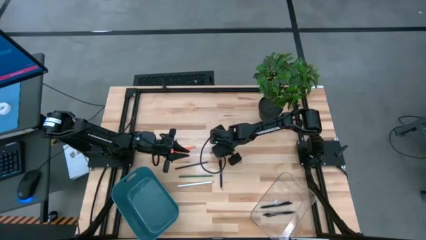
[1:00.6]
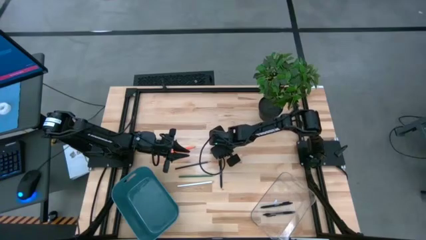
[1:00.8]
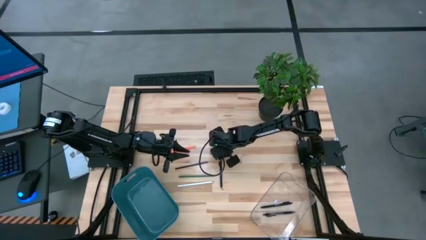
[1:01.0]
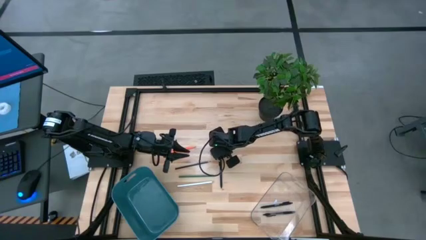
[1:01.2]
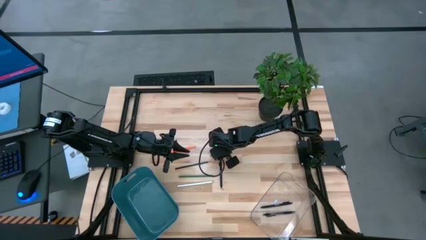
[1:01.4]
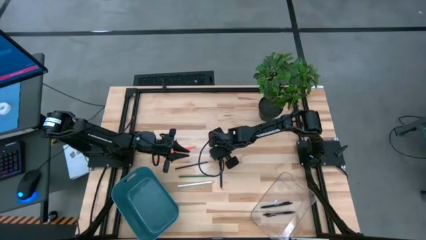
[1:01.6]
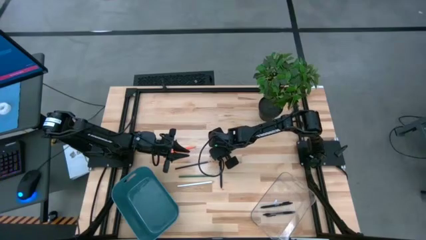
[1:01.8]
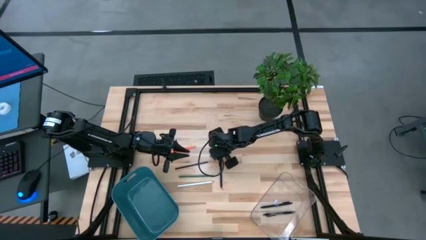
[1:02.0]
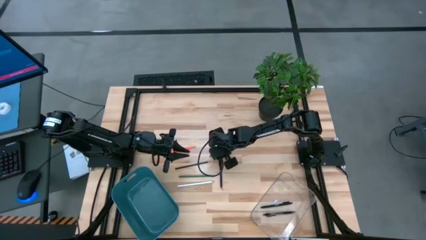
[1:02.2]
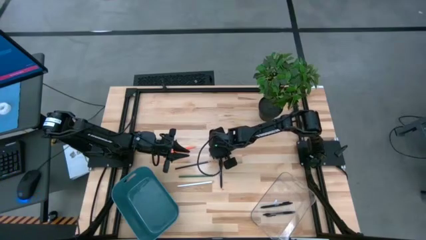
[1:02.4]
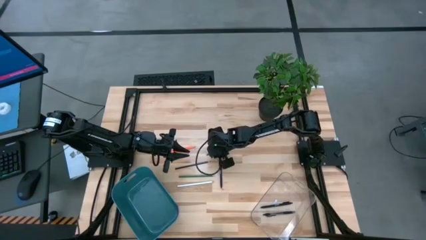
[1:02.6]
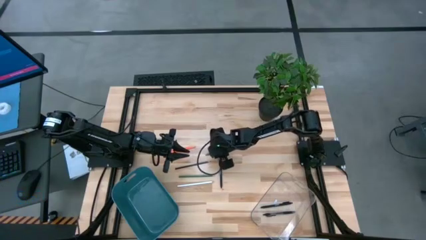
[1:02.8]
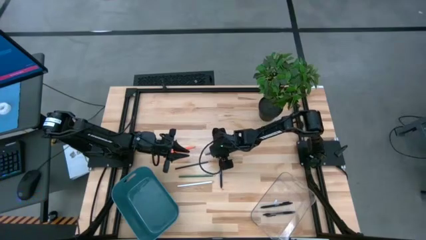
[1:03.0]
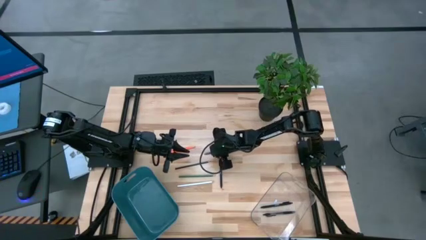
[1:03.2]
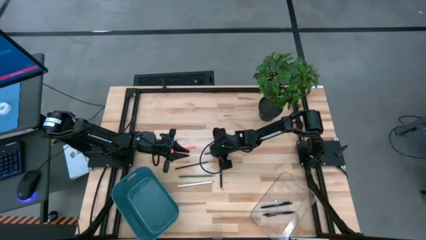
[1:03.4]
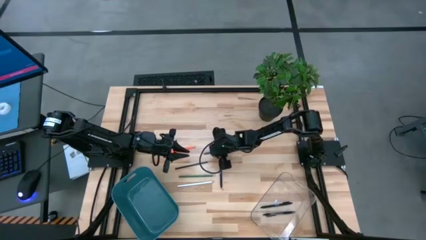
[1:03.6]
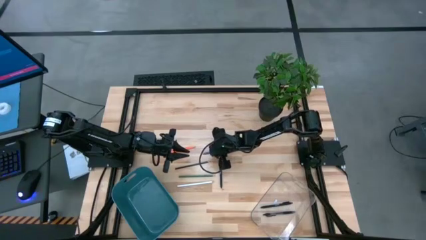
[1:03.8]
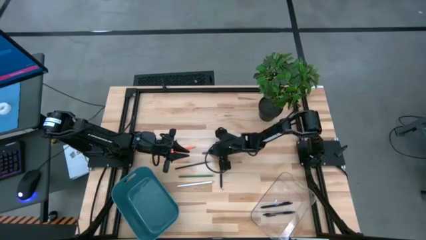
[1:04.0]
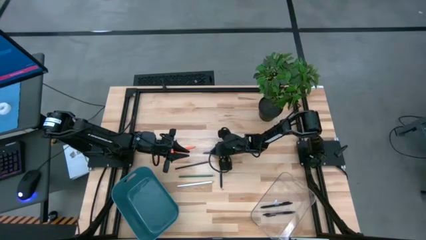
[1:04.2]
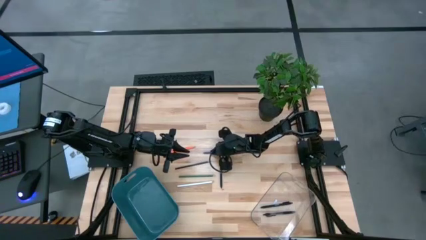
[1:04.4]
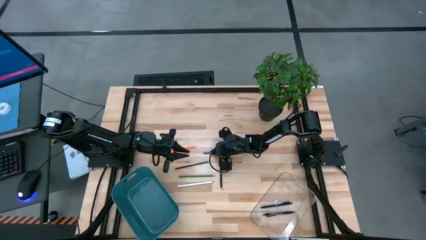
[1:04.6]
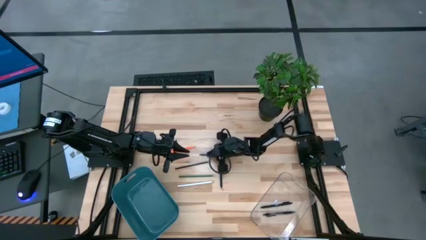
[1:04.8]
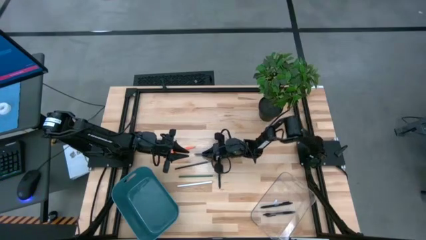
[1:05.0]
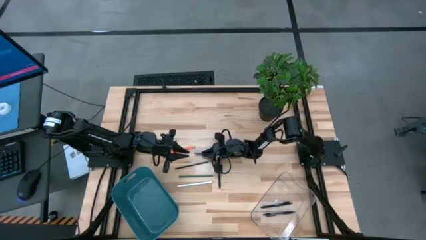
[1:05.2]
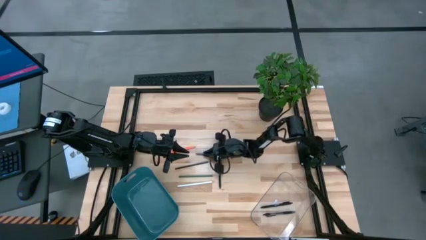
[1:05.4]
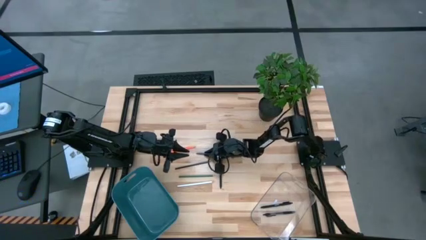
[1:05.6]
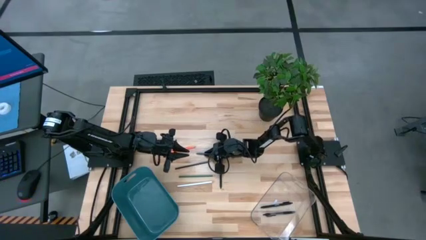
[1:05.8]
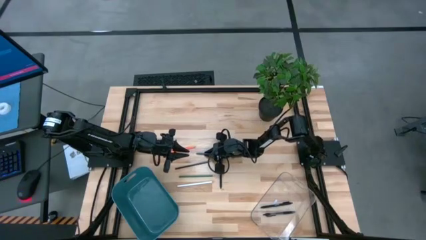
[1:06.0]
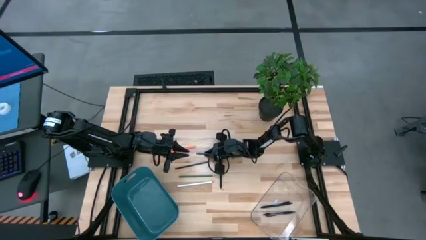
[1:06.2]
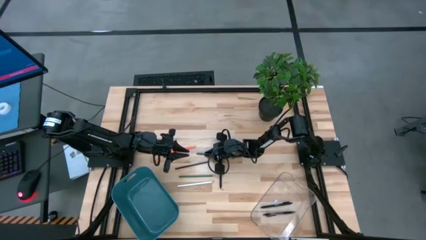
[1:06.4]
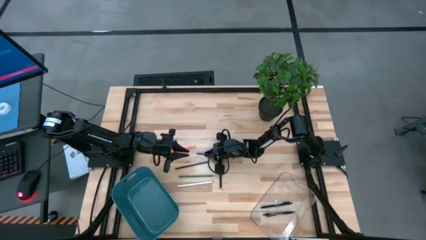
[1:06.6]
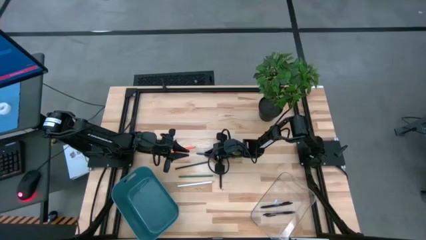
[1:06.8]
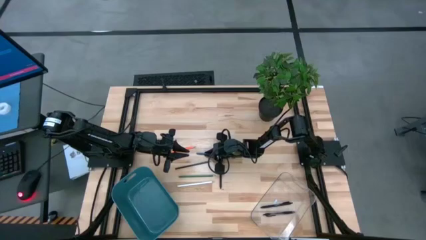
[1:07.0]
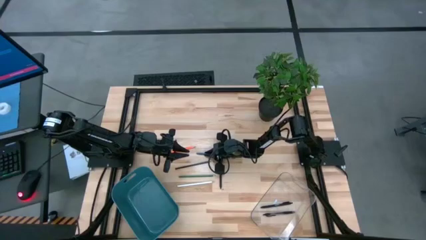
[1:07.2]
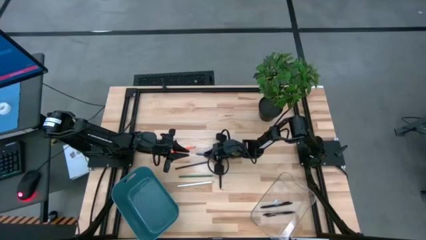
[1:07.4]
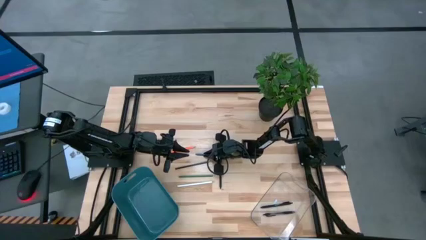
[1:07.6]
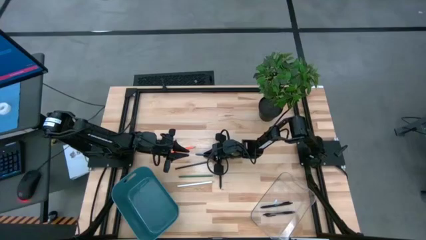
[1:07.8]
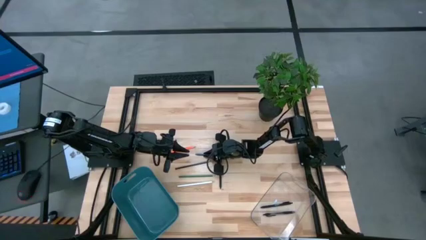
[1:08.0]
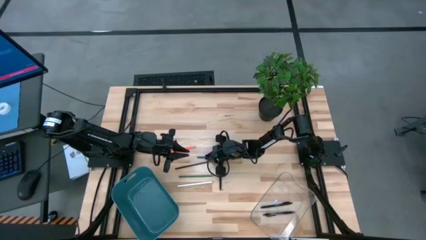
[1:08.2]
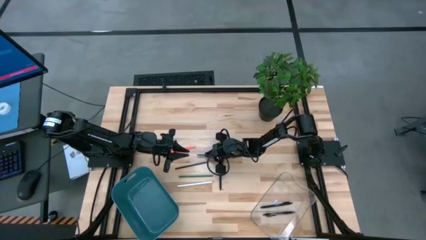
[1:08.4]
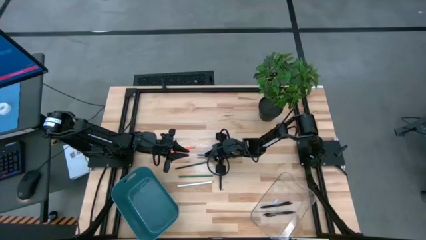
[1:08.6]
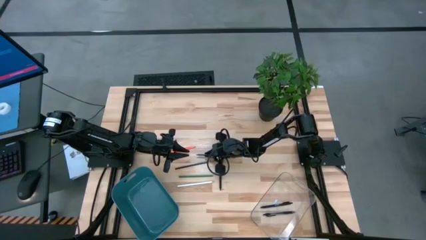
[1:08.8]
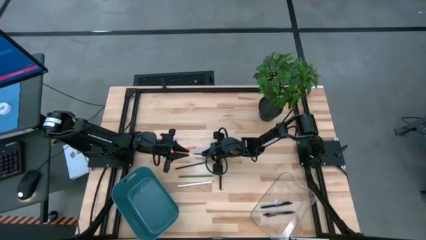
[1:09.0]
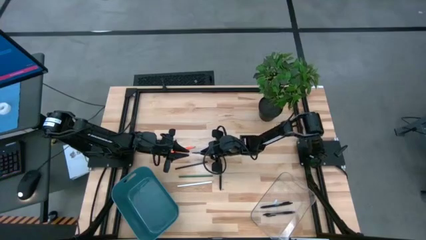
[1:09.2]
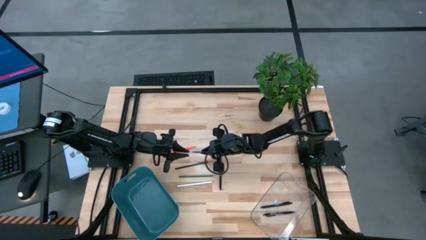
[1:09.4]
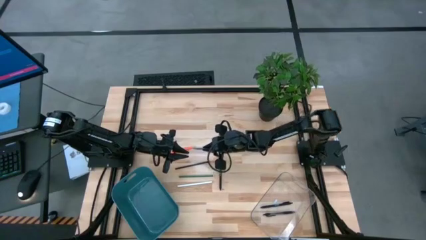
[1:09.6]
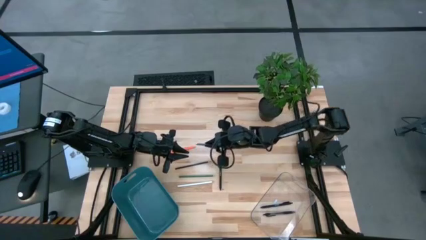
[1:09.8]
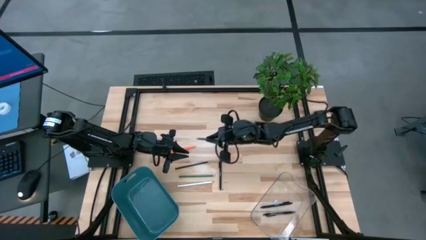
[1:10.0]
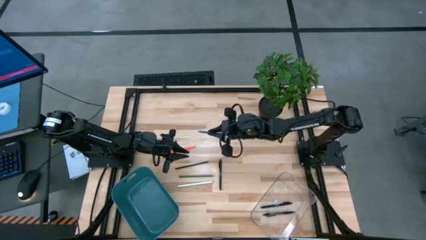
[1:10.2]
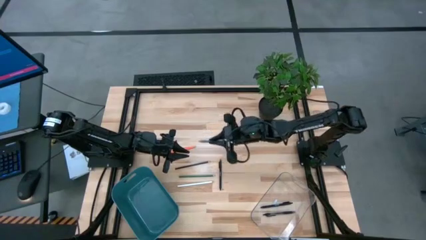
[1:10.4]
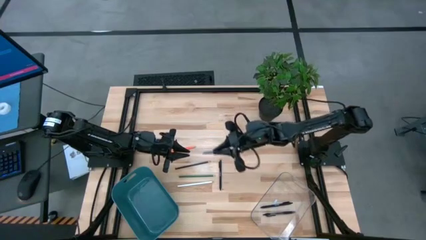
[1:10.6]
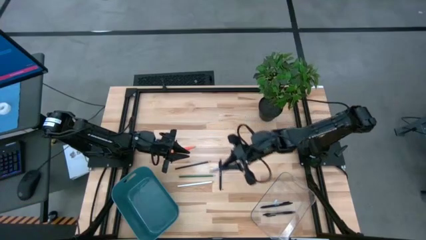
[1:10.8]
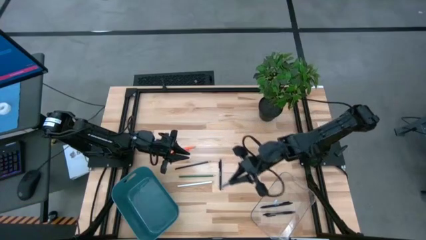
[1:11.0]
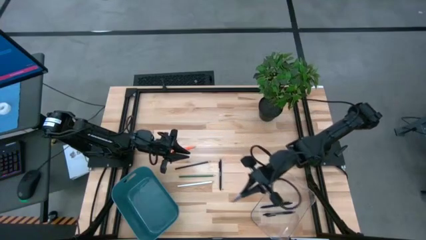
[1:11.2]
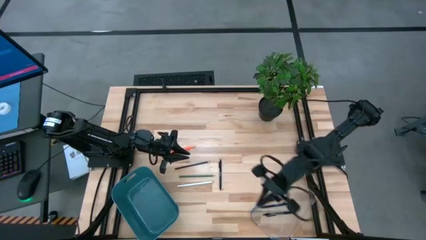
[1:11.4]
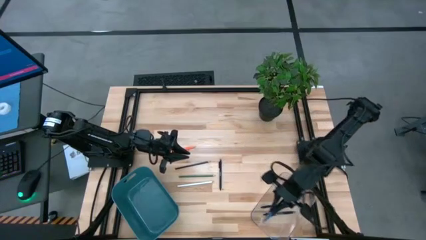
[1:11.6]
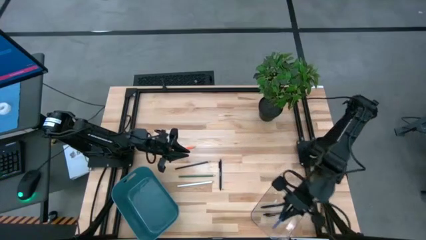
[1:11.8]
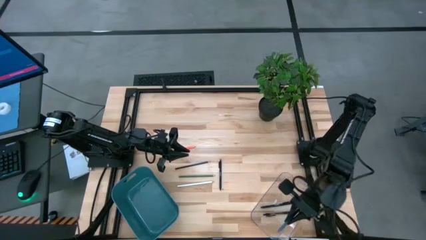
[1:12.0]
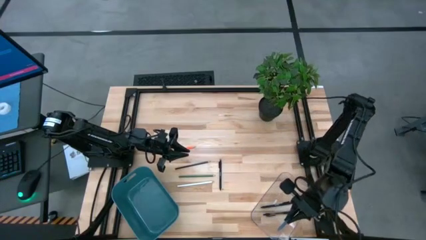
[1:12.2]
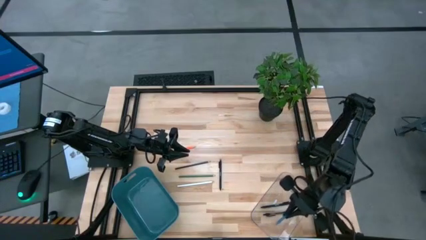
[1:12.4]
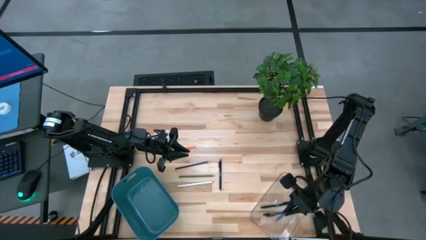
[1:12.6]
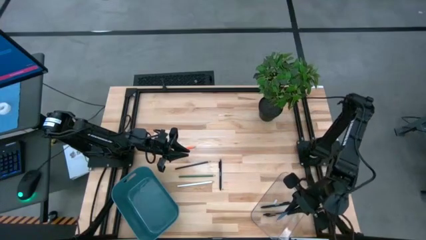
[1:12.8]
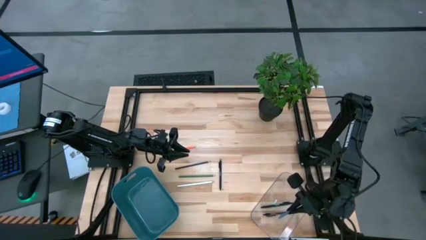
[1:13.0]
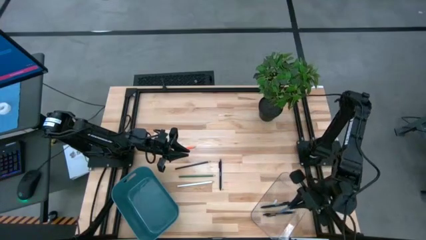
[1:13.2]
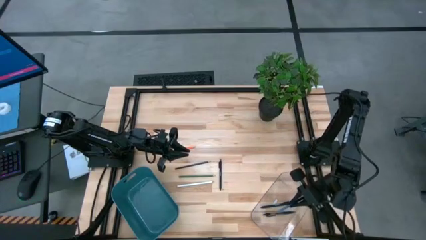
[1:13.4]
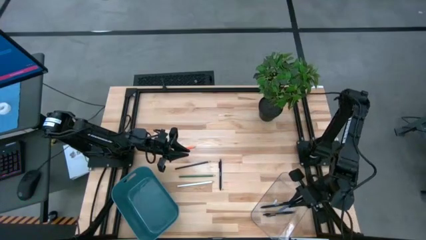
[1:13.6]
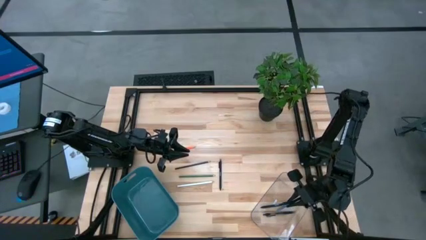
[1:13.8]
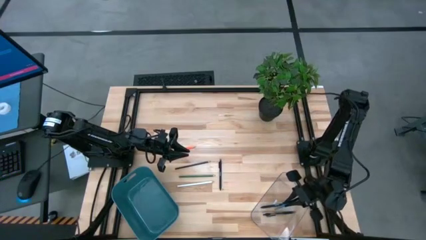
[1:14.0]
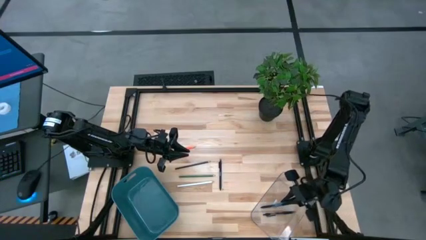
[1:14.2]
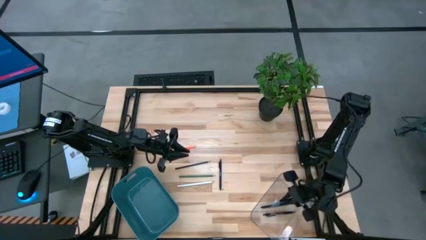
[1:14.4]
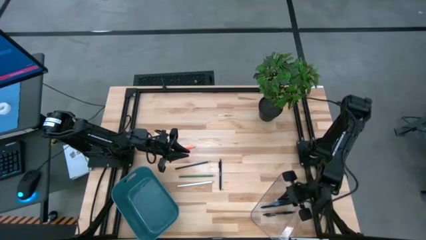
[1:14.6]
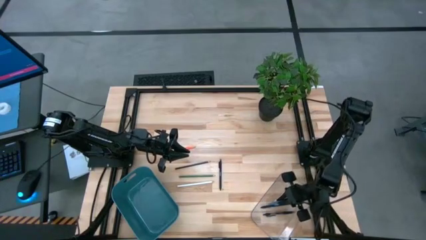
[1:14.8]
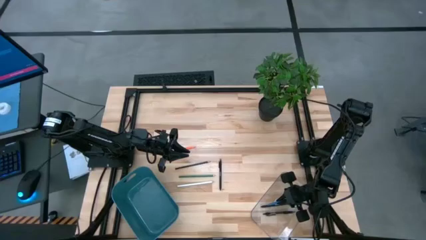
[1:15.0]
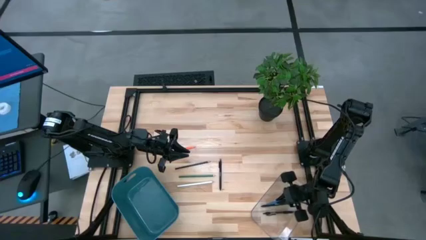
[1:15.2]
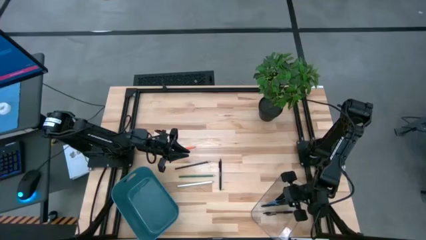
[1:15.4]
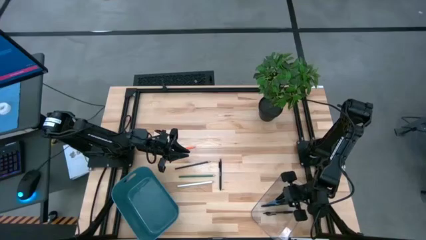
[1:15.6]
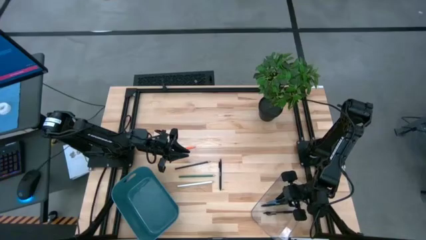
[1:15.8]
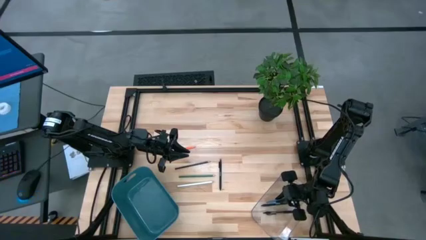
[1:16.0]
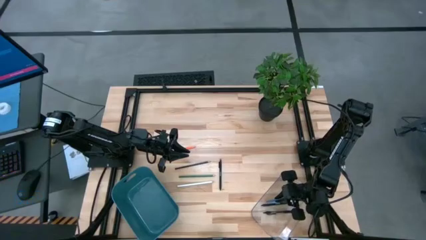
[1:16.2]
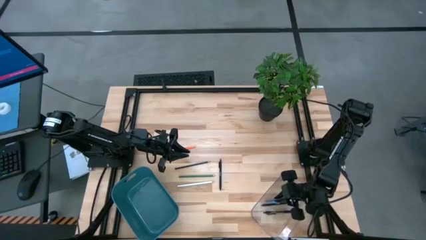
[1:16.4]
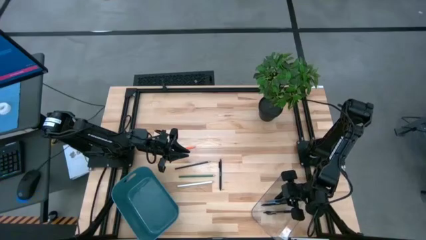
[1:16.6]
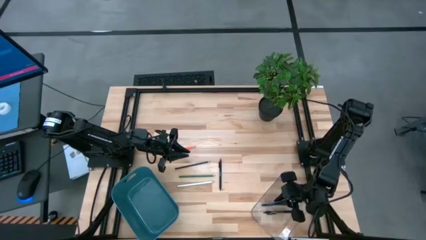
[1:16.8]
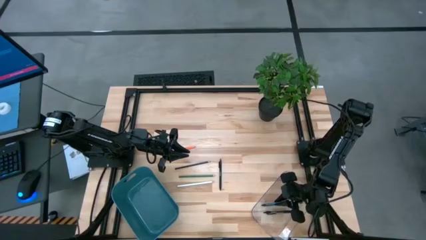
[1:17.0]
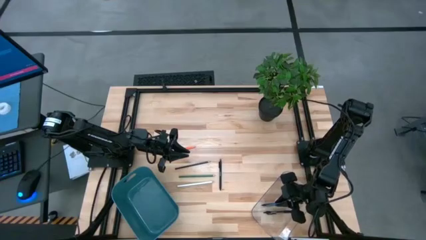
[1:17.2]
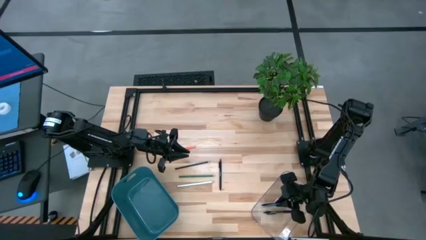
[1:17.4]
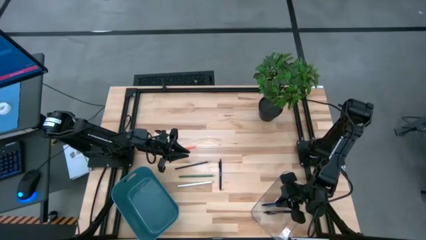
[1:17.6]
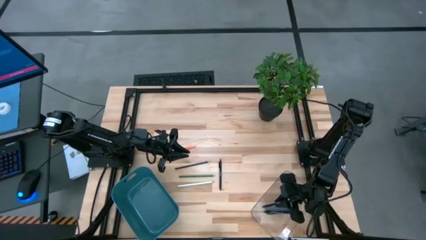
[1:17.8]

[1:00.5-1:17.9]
Task: Sort pens & pencils
Put the blue pen in the transparent bin
